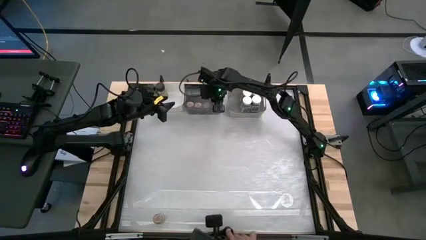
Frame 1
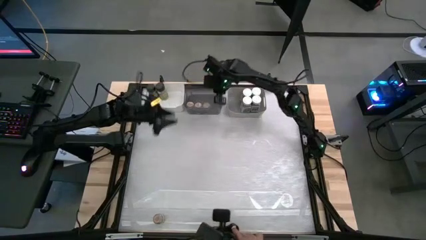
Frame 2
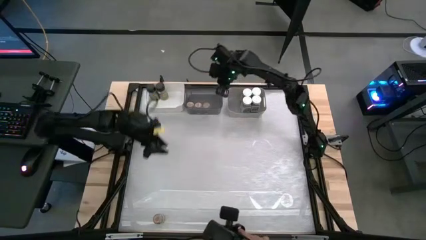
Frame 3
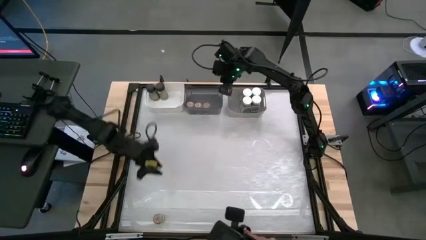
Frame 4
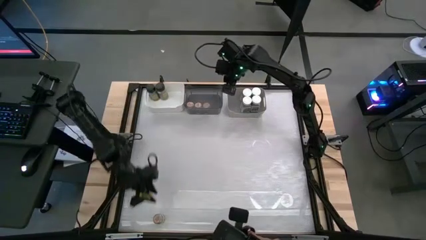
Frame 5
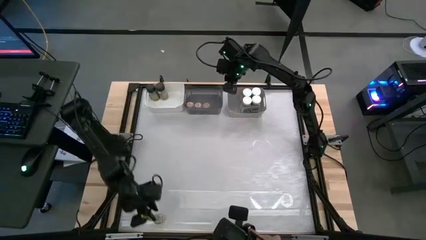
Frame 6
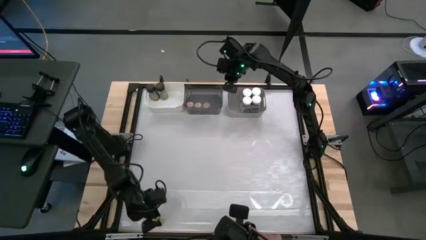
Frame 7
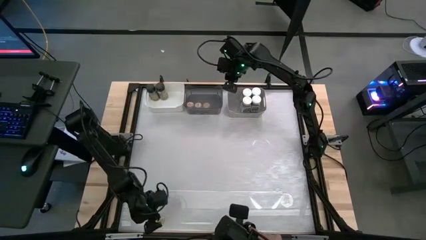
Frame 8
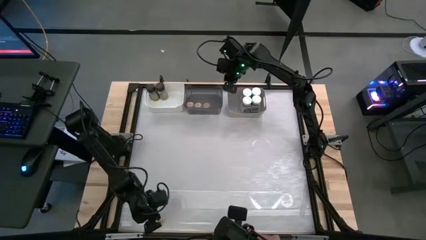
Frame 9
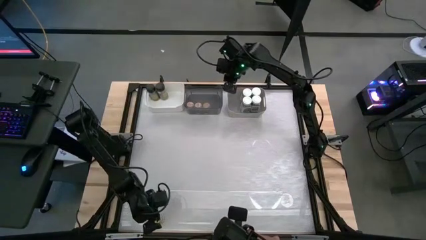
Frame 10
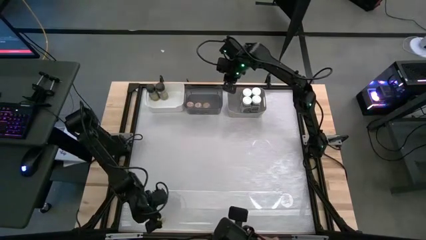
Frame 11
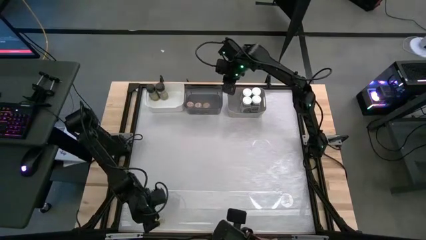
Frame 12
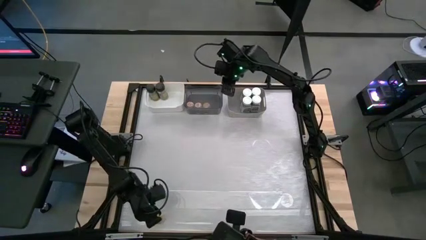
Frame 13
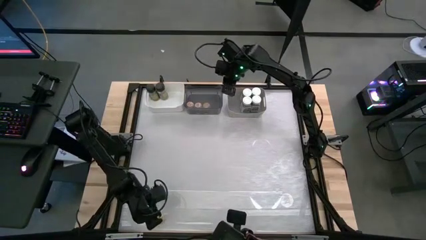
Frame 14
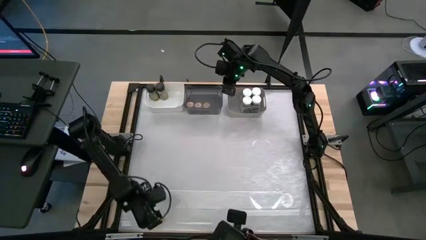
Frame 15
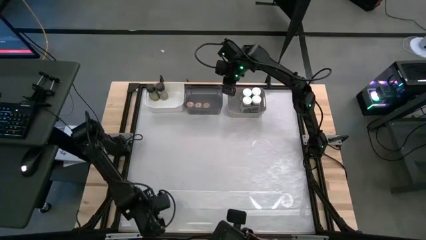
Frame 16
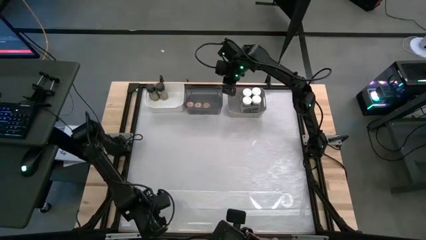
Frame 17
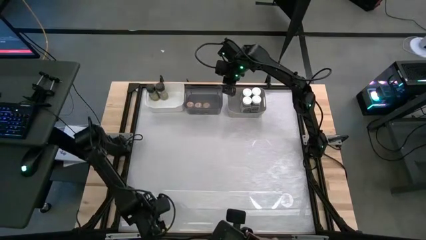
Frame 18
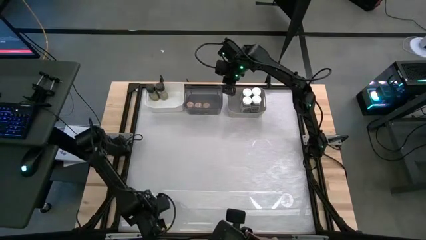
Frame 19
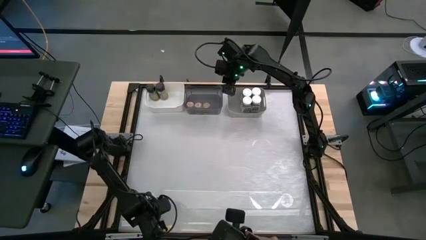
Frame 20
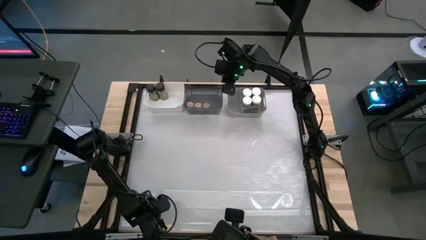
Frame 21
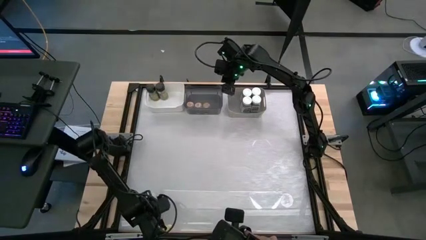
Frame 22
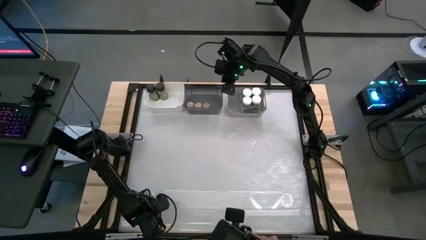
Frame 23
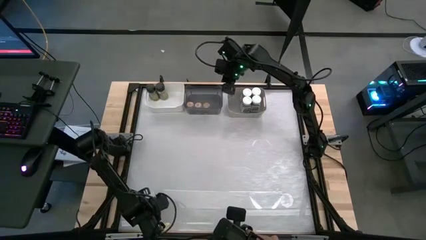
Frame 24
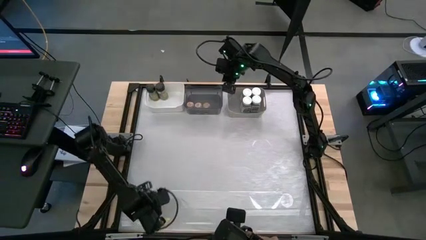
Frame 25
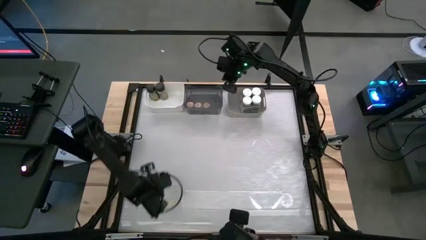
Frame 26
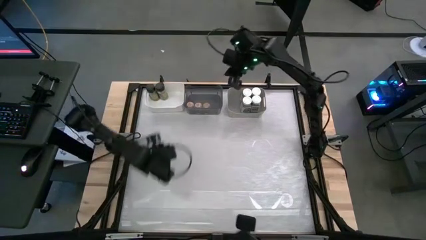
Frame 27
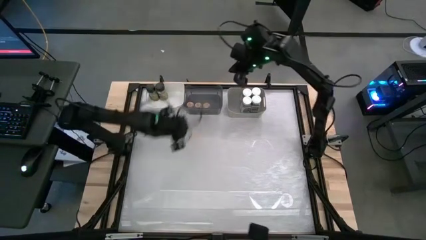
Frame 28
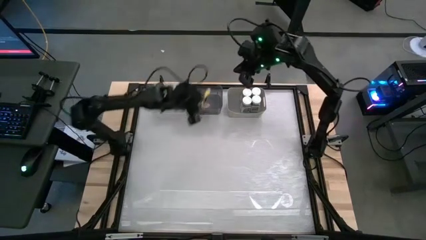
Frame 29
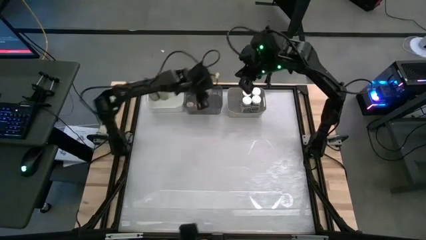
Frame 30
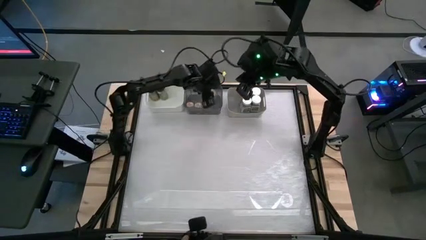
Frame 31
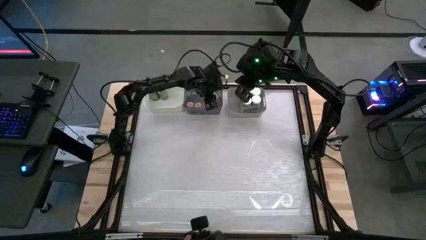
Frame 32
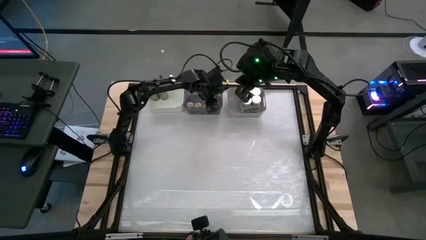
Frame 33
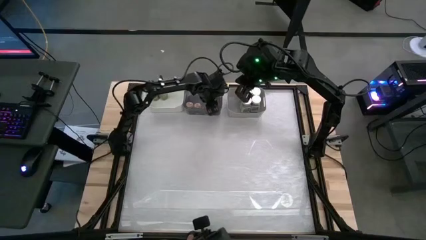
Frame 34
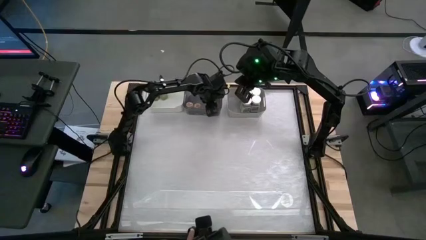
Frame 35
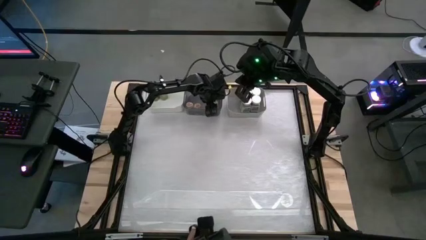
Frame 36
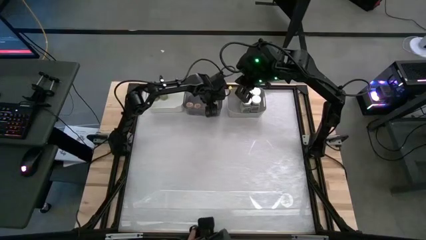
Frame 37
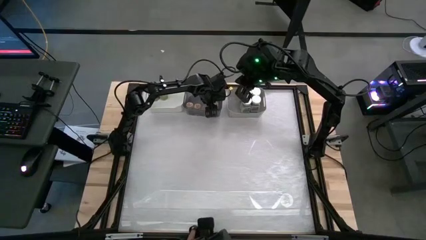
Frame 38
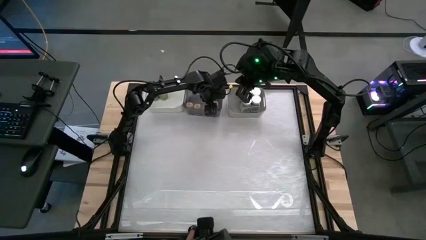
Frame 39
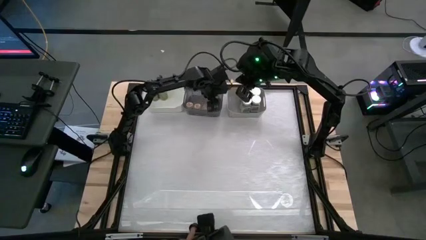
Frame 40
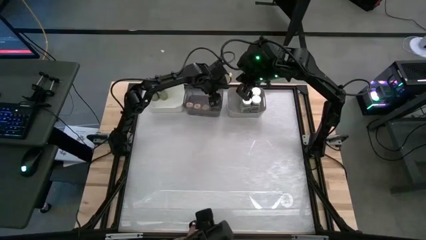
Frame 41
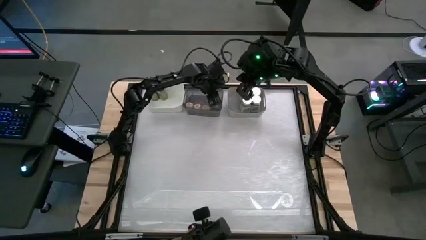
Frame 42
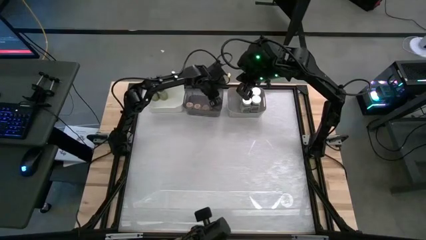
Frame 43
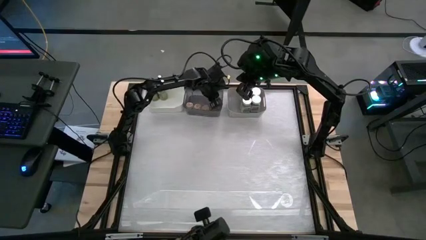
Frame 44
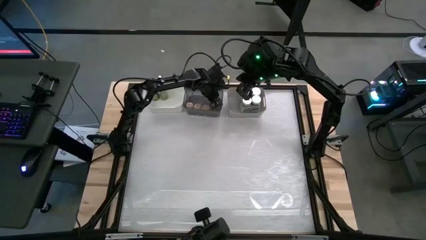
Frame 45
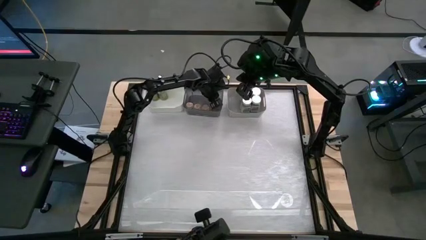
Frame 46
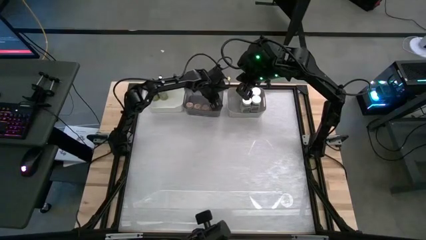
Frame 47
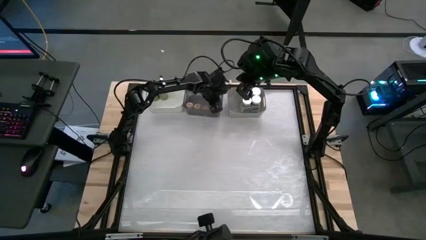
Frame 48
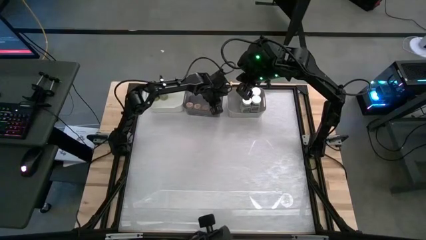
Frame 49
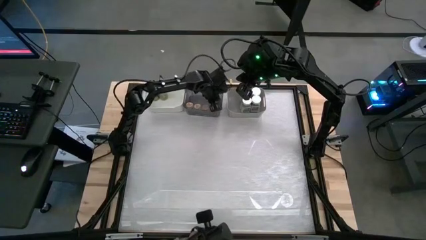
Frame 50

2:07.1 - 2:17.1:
Task: Sort spices by type
Put the brown seasoning bottle into the black bin
